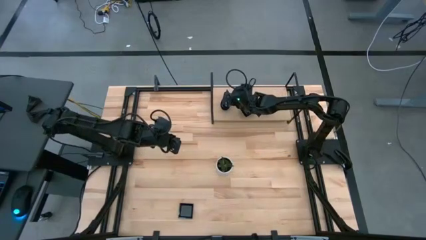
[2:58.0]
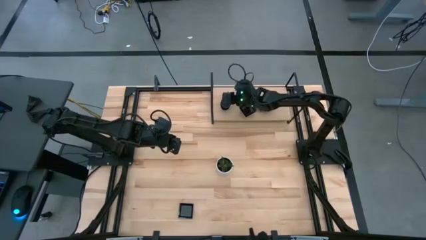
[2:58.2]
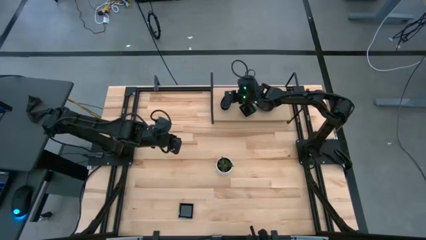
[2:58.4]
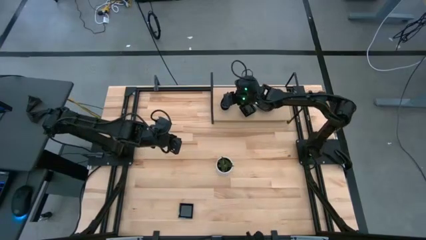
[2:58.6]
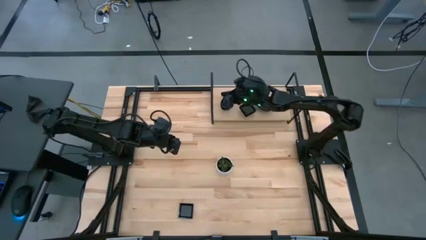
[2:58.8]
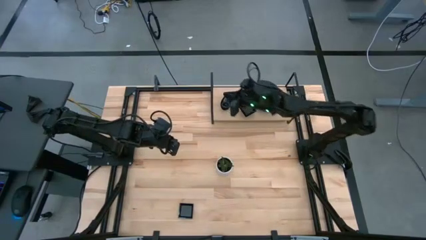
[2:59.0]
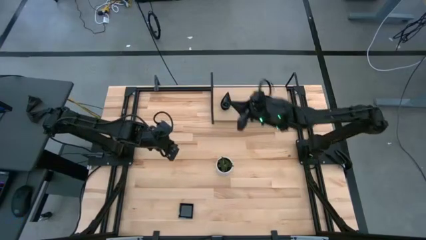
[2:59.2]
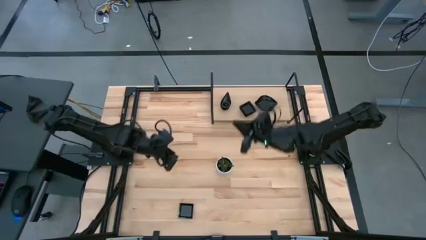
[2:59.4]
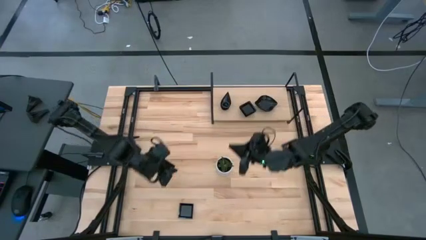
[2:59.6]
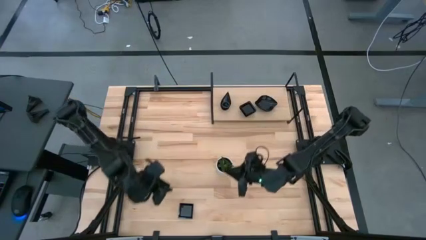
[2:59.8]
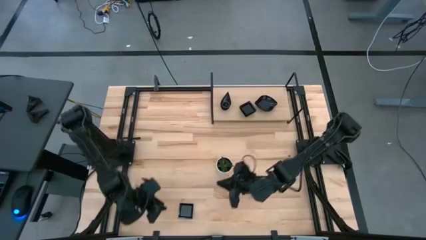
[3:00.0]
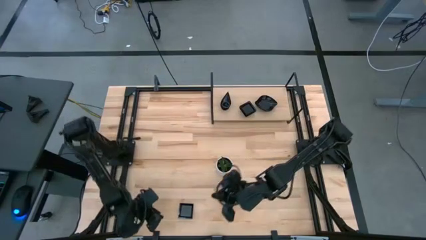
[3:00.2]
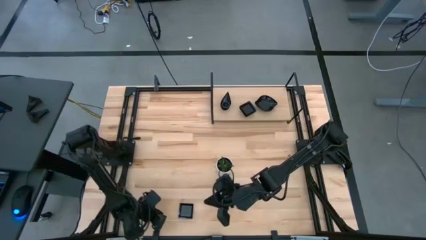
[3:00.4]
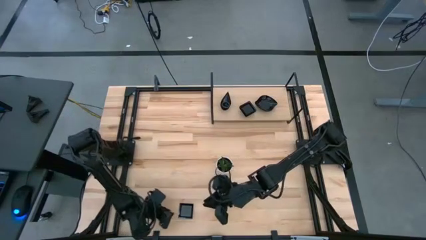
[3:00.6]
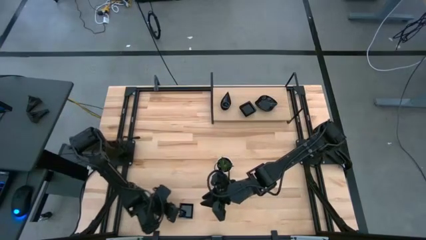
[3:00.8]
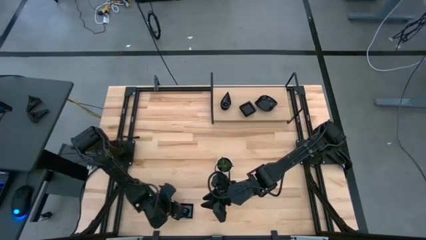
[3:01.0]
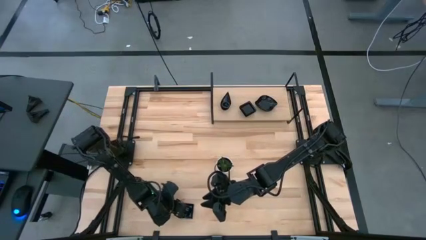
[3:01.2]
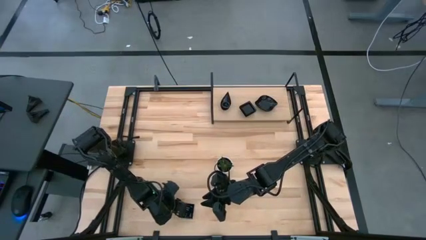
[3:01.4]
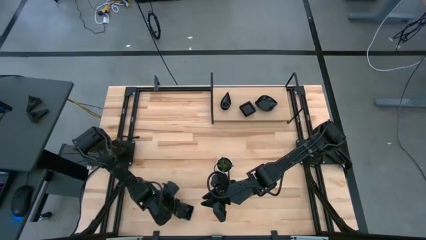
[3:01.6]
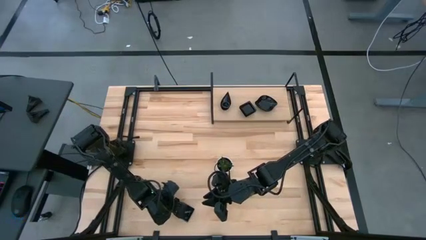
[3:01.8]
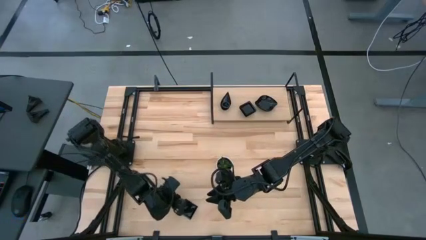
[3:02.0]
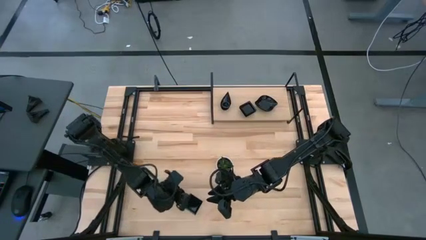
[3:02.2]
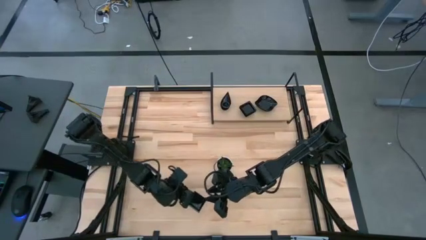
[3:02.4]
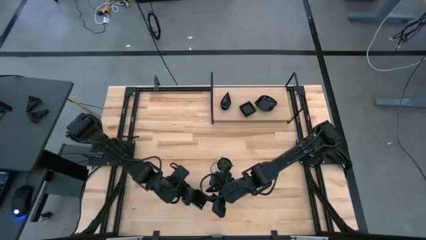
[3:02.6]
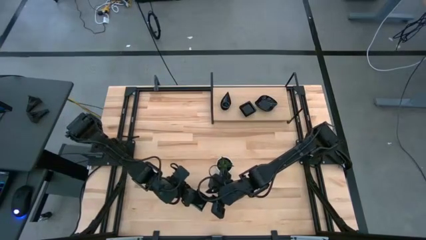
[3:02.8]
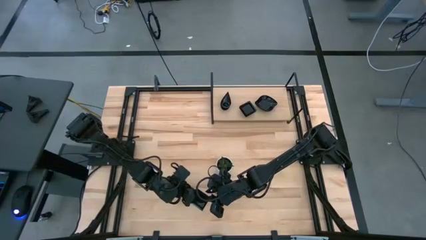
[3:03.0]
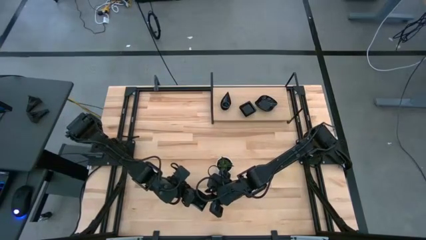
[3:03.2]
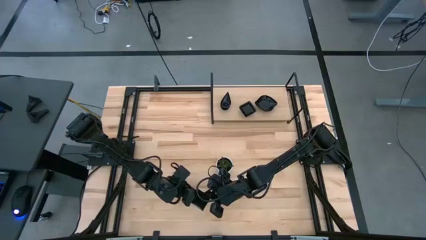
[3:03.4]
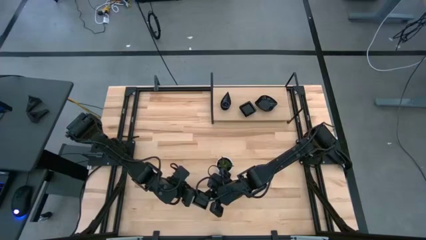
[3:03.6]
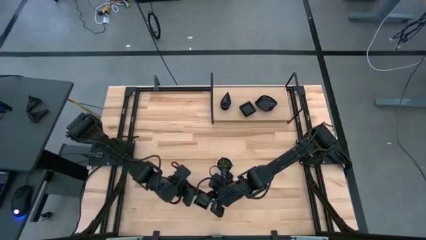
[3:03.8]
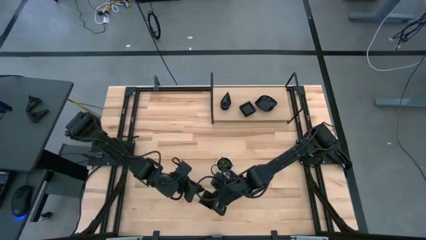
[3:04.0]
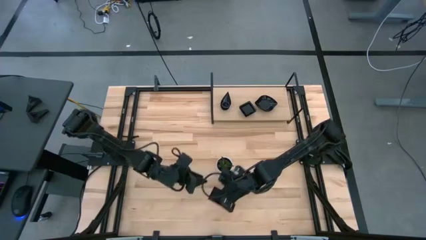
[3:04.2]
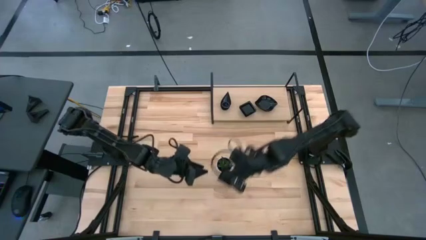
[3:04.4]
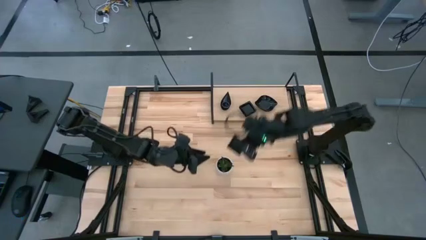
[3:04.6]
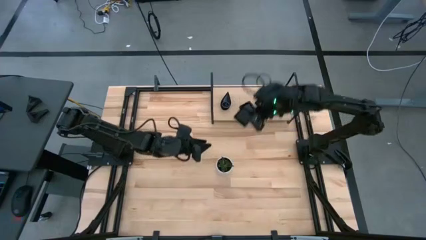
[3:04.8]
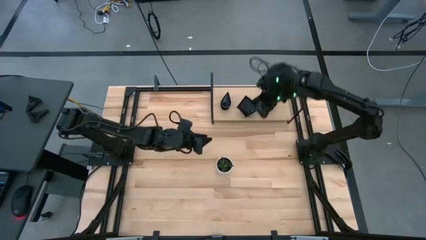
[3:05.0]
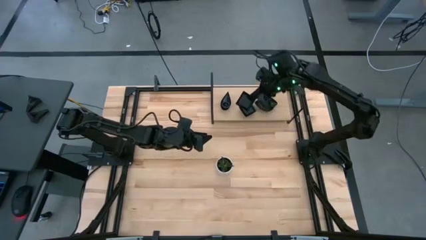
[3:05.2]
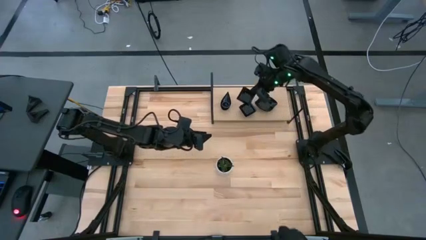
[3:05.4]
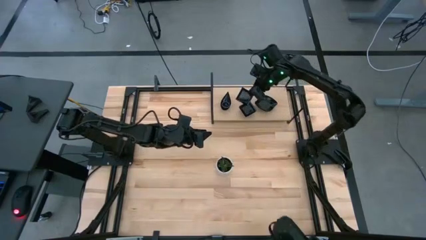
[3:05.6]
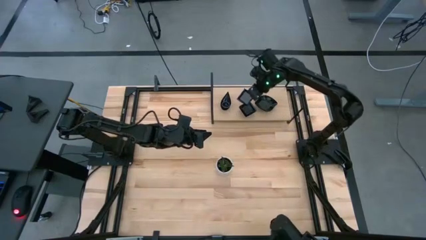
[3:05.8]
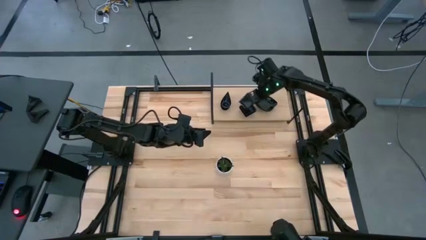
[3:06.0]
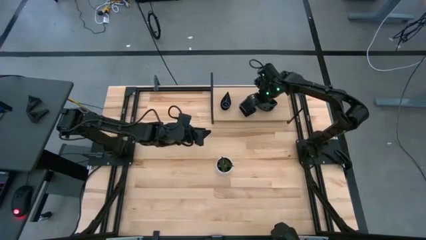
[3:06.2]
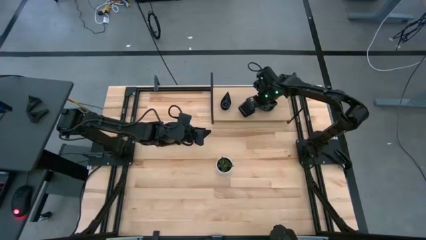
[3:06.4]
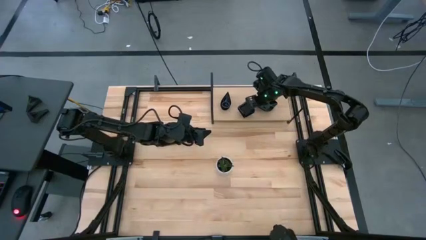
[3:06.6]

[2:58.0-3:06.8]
Task: Pick & Place Mini shaped plates
Stack the square plate on top of the square plate on the shelf

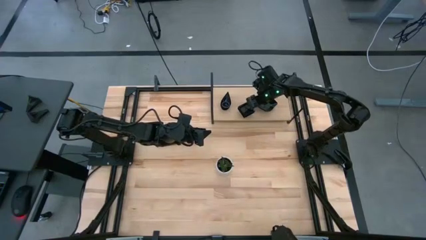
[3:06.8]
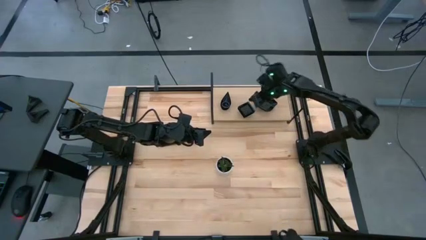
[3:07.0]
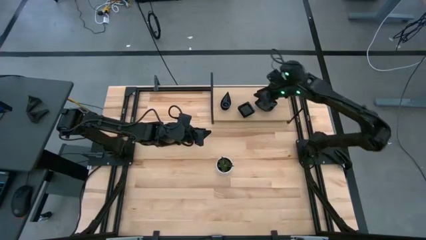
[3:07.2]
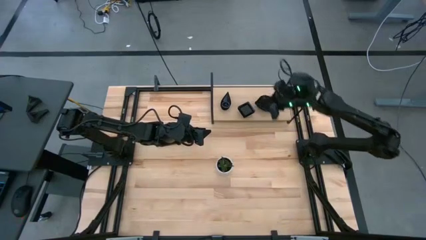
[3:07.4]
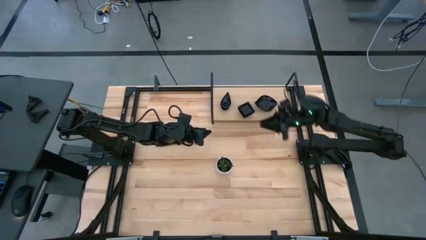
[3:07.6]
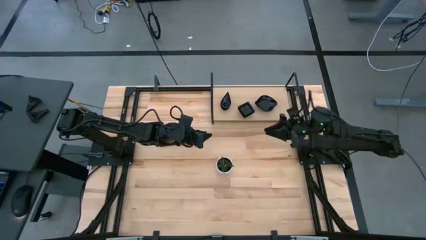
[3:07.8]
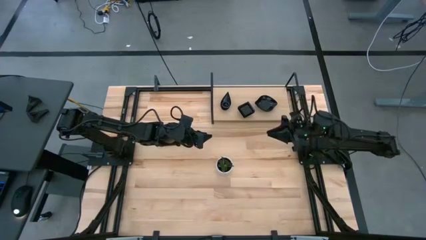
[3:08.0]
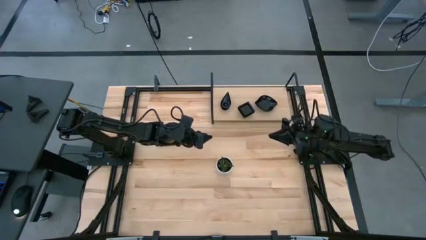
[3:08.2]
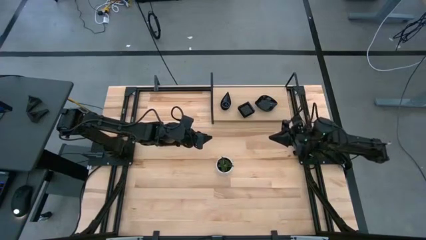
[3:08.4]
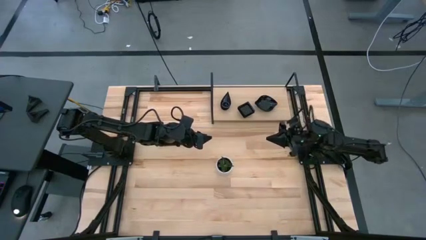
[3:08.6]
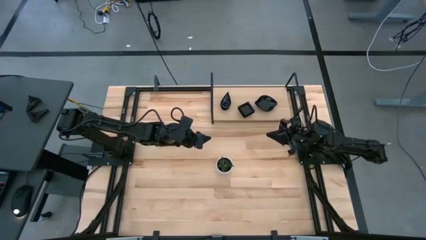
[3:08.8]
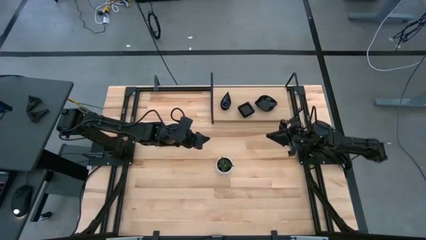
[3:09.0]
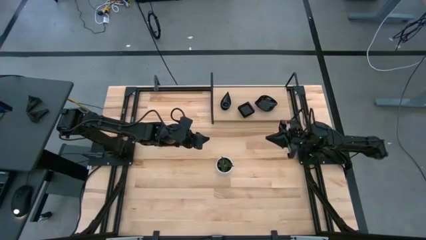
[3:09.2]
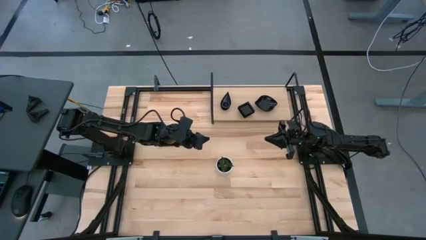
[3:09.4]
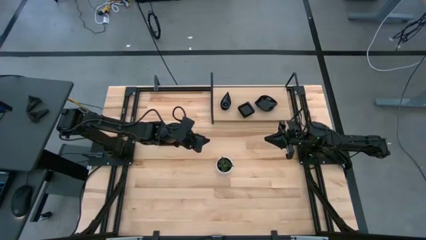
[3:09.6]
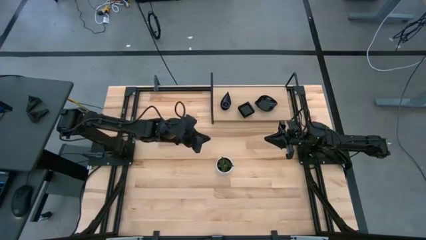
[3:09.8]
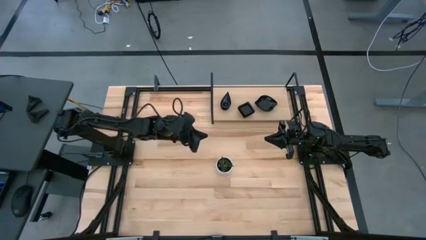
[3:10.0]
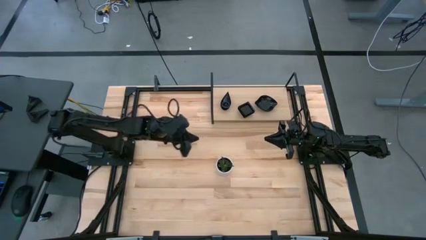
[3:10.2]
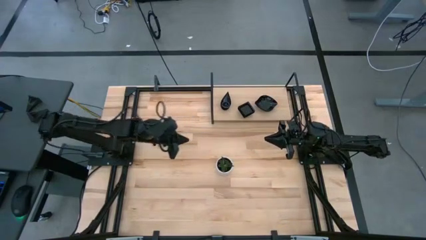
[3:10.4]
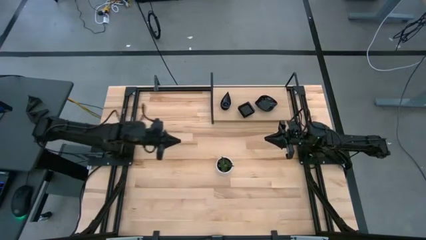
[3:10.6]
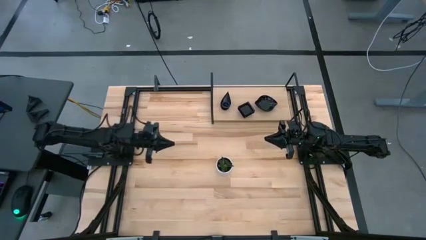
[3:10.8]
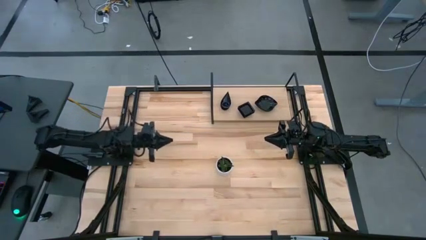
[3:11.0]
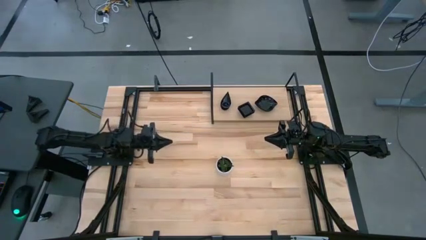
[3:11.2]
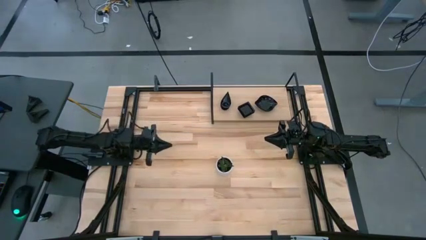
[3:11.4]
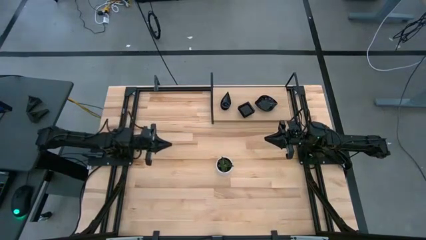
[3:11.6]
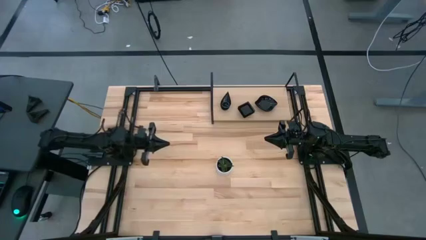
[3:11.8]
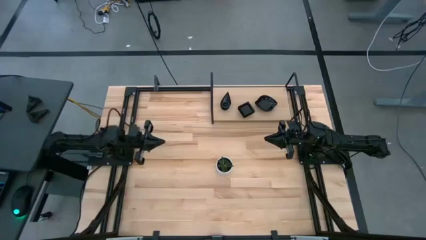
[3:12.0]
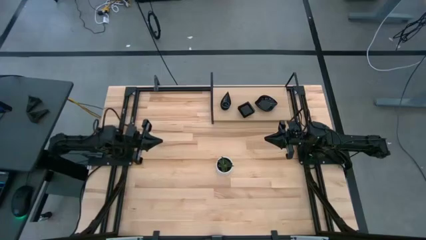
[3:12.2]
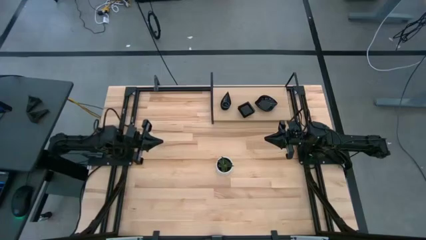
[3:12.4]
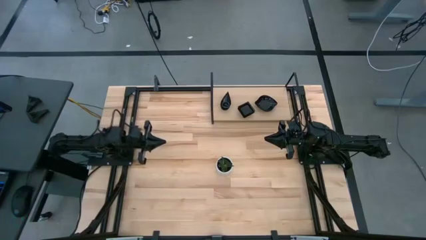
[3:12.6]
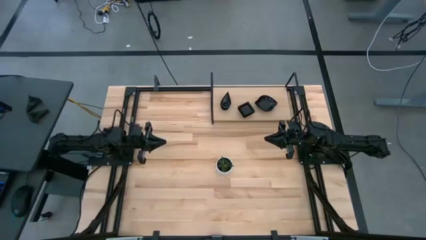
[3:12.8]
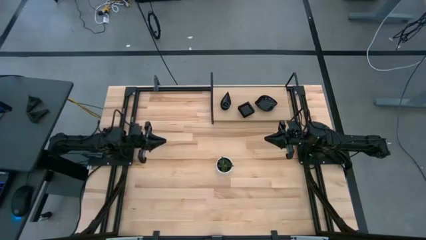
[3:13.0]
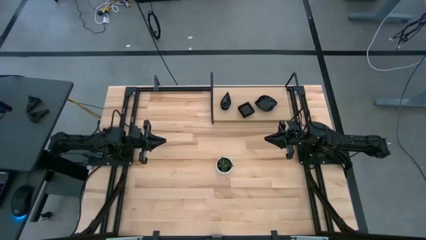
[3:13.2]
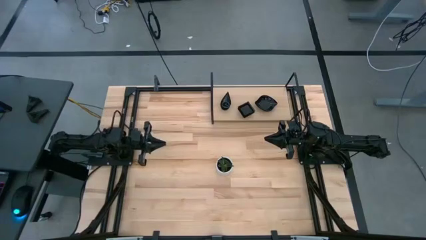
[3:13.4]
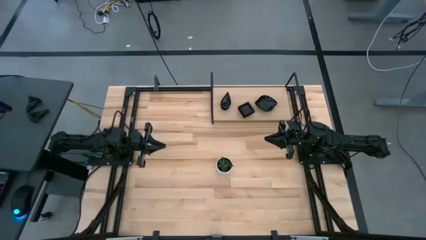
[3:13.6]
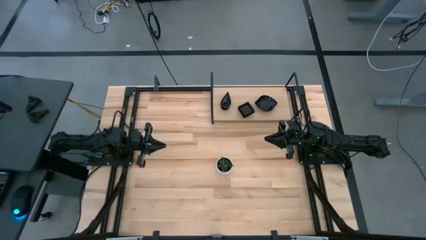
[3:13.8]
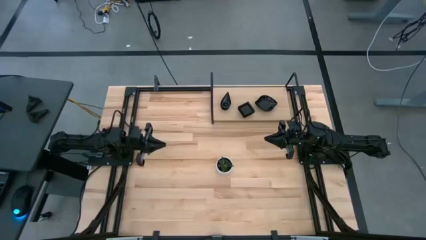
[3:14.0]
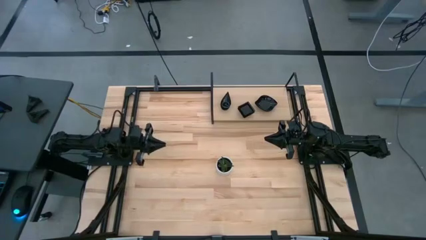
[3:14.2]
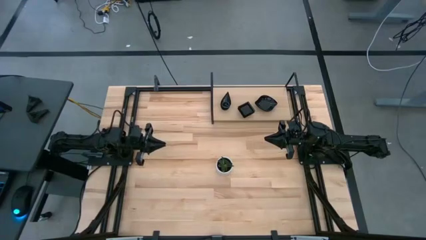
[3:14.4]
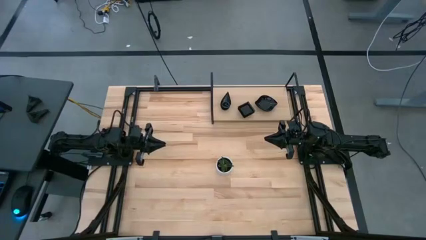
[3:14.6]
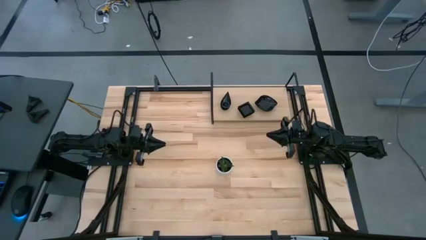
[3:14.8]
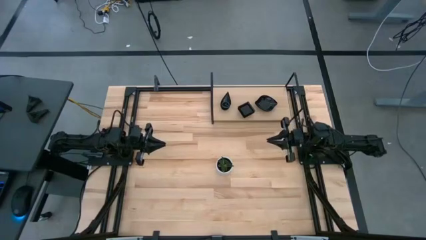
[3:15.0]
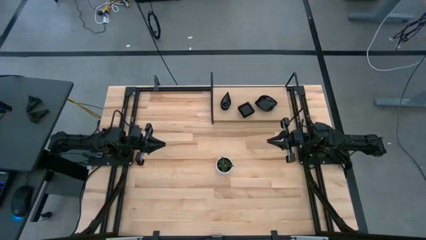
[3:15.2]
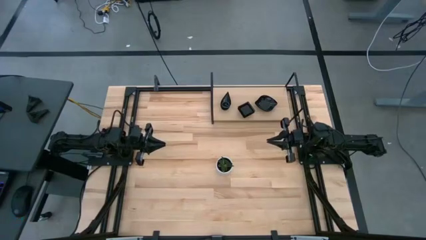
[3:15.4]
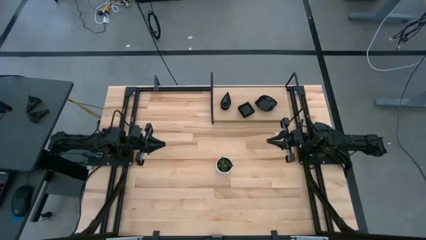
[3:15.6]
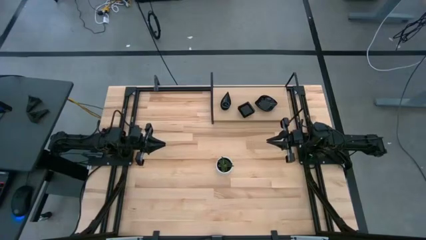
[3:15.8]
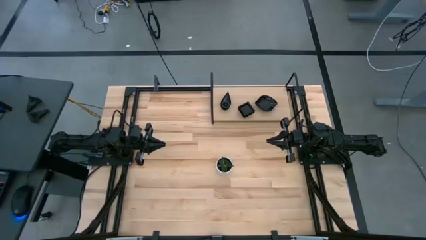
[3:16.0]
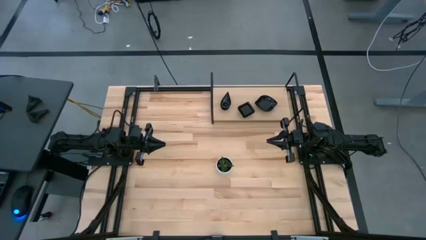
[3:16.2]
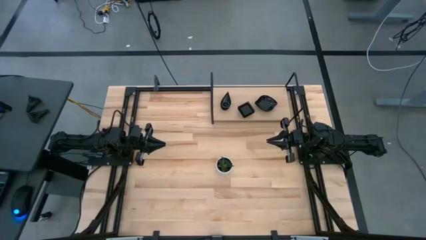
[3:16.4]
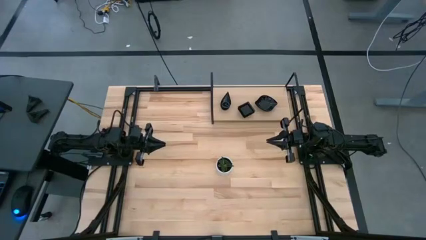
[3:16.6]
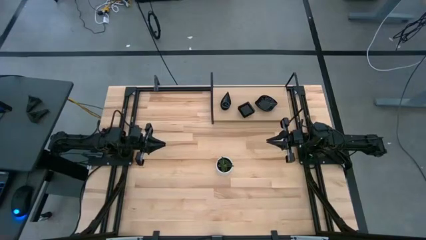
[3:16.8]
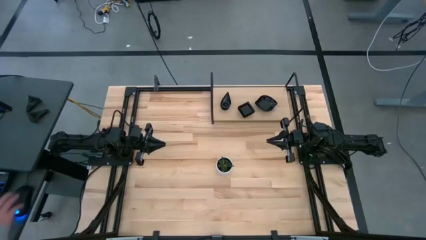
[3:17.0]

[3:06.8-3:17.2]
Return to Home Position
